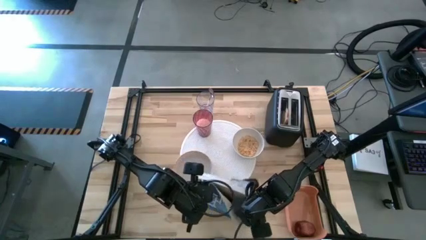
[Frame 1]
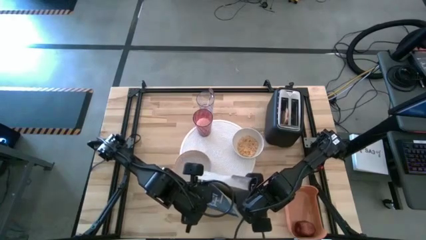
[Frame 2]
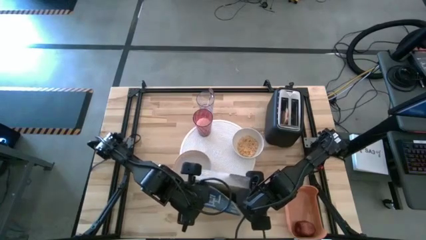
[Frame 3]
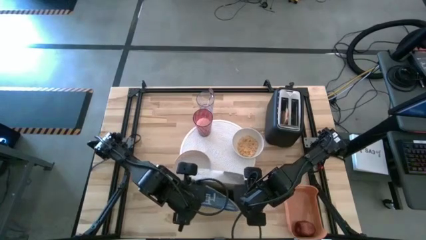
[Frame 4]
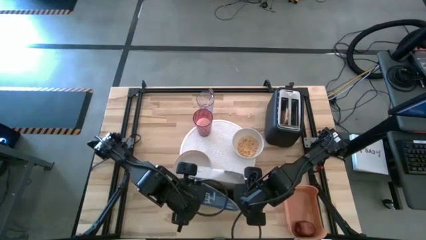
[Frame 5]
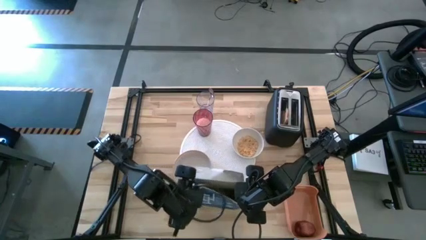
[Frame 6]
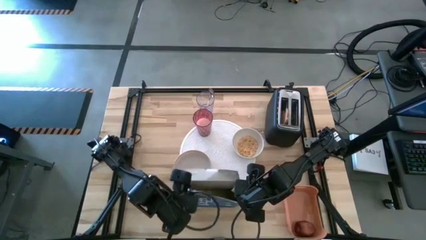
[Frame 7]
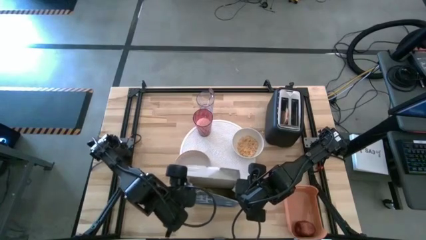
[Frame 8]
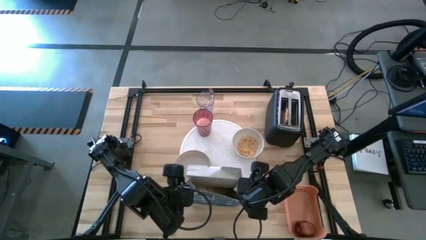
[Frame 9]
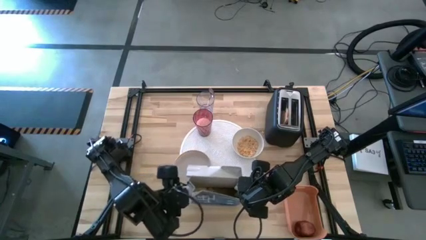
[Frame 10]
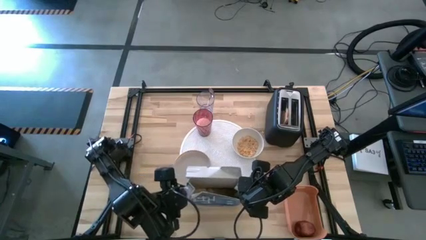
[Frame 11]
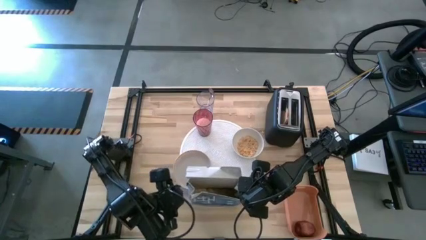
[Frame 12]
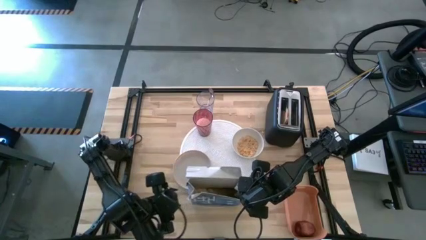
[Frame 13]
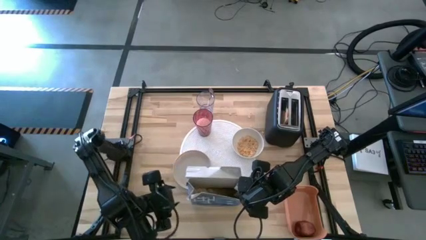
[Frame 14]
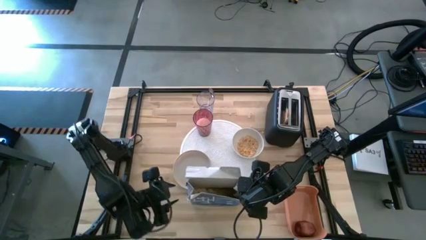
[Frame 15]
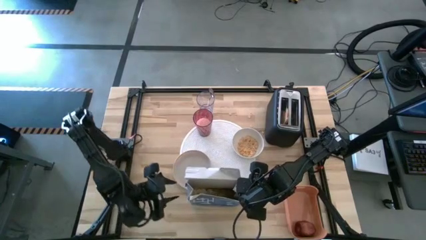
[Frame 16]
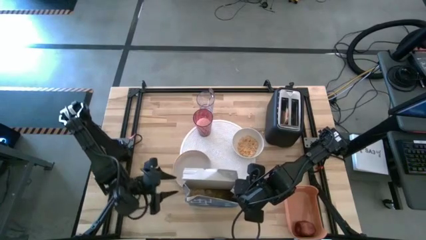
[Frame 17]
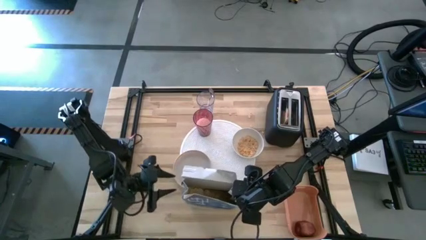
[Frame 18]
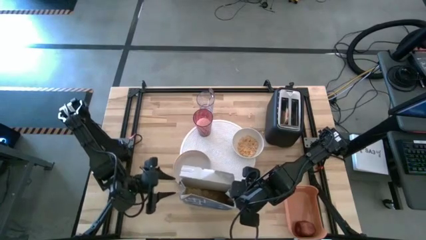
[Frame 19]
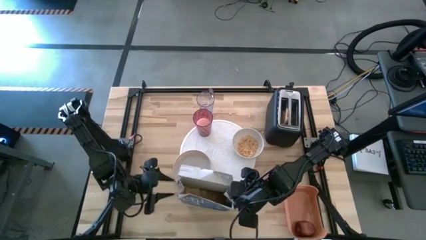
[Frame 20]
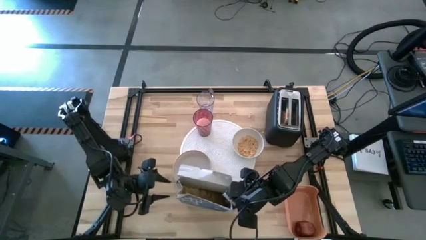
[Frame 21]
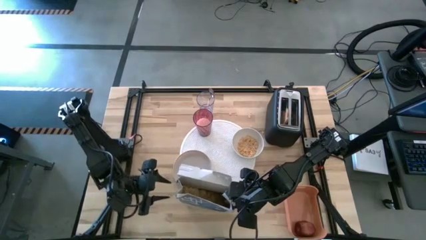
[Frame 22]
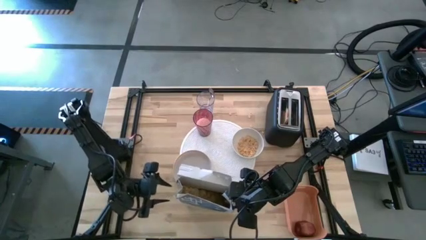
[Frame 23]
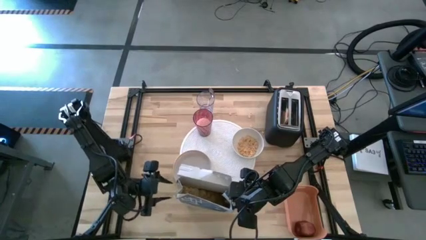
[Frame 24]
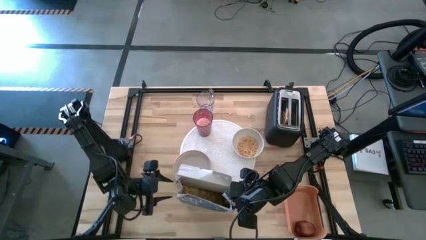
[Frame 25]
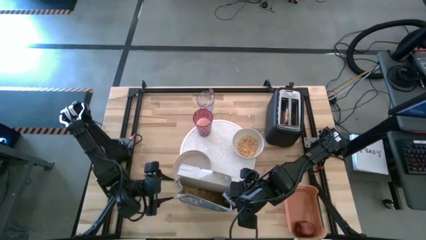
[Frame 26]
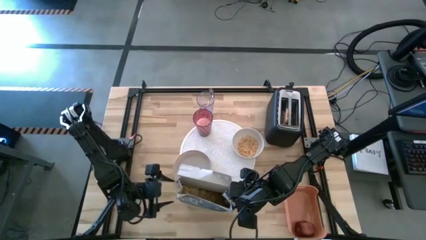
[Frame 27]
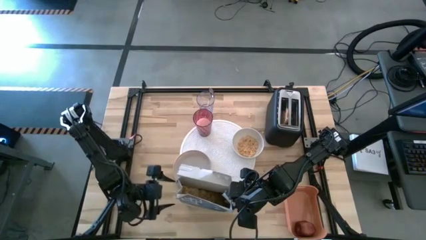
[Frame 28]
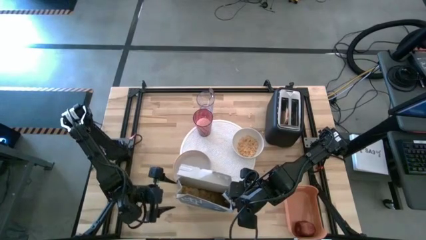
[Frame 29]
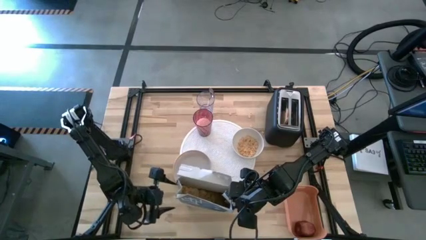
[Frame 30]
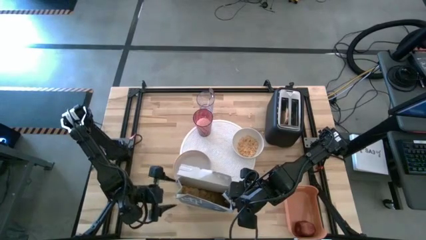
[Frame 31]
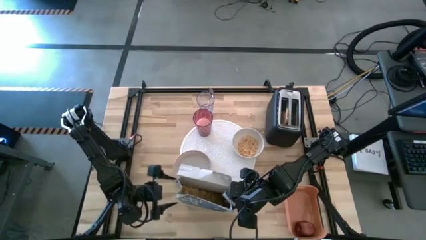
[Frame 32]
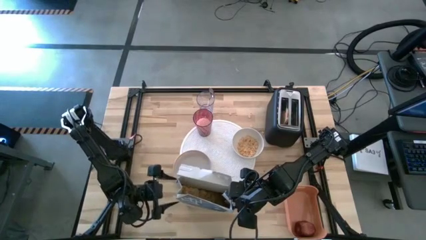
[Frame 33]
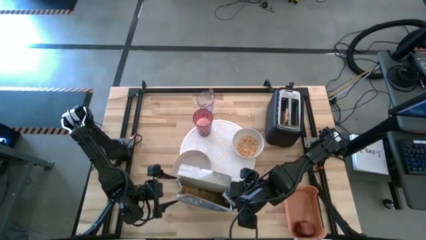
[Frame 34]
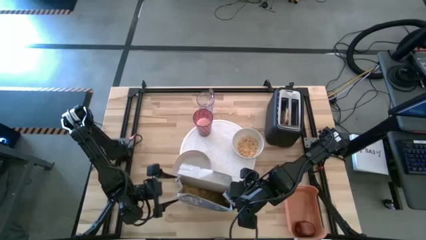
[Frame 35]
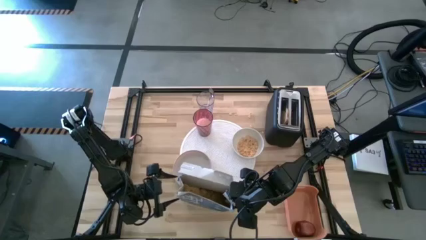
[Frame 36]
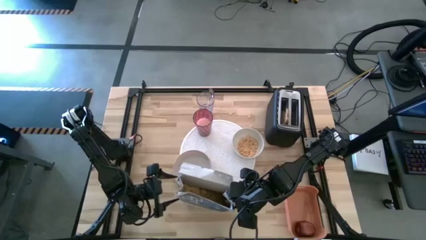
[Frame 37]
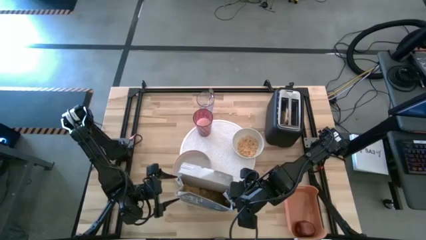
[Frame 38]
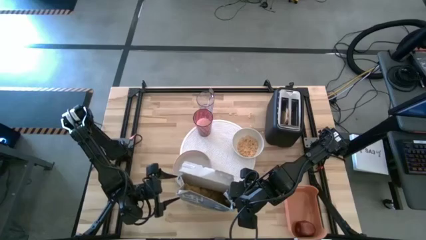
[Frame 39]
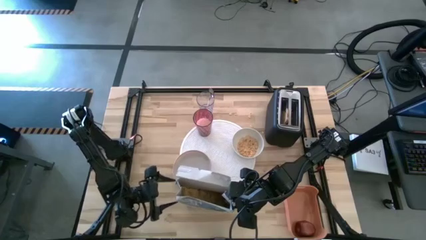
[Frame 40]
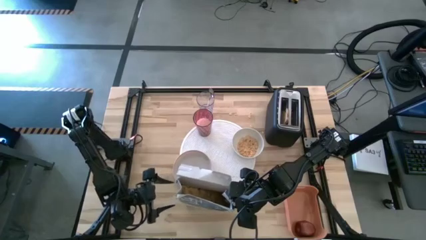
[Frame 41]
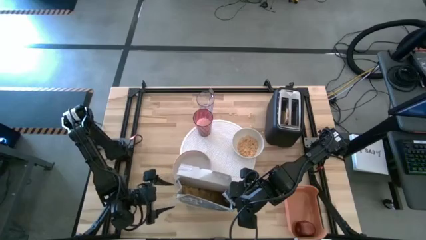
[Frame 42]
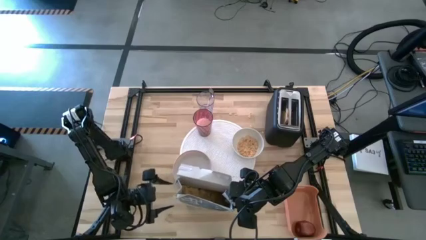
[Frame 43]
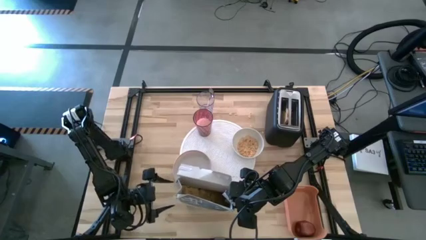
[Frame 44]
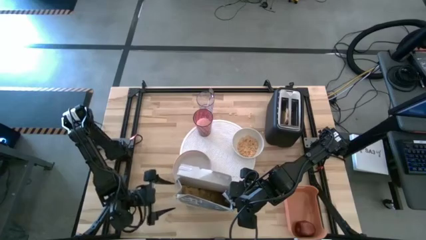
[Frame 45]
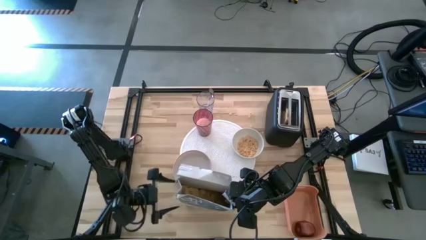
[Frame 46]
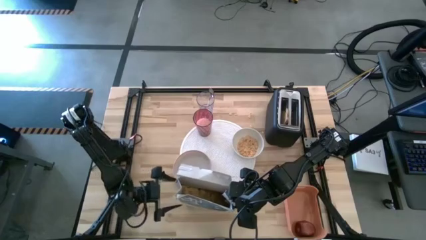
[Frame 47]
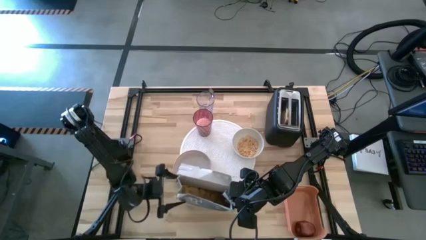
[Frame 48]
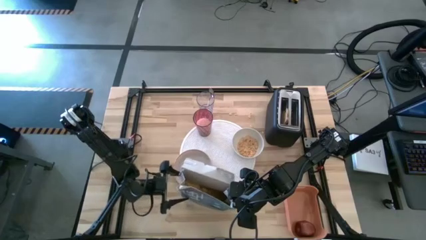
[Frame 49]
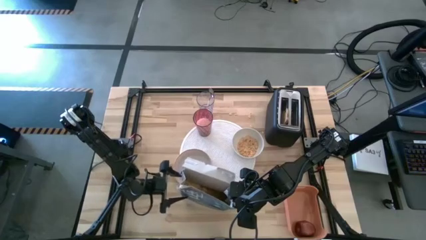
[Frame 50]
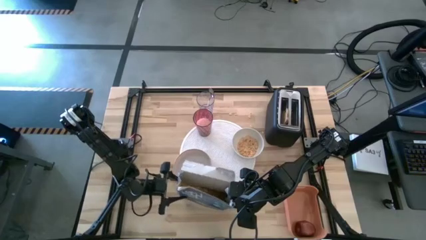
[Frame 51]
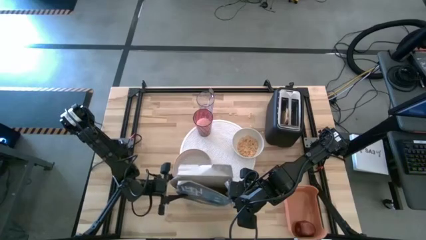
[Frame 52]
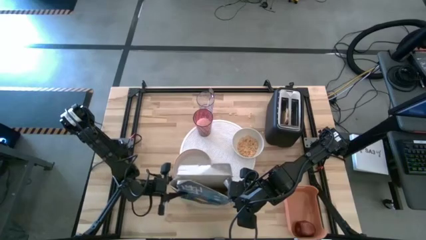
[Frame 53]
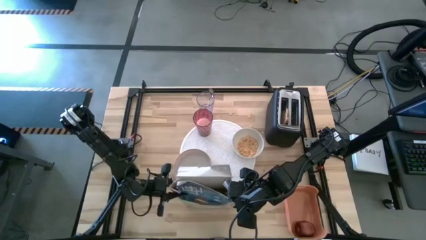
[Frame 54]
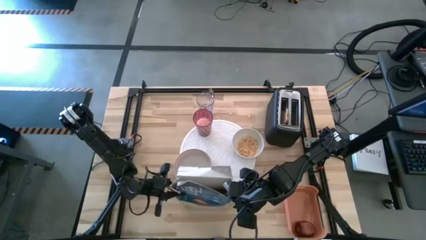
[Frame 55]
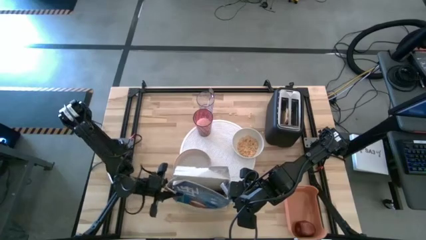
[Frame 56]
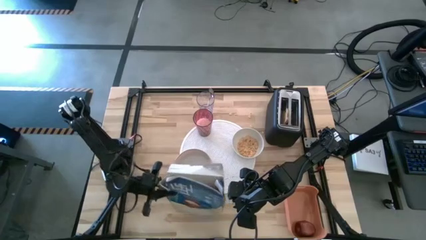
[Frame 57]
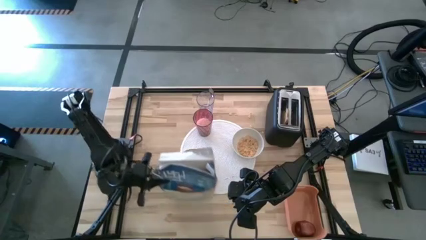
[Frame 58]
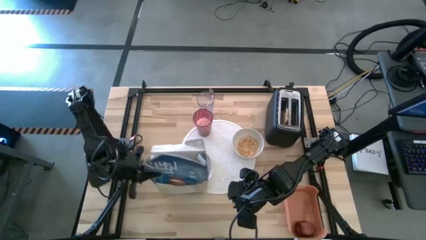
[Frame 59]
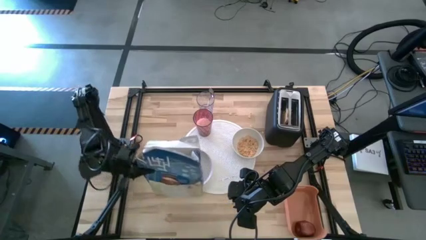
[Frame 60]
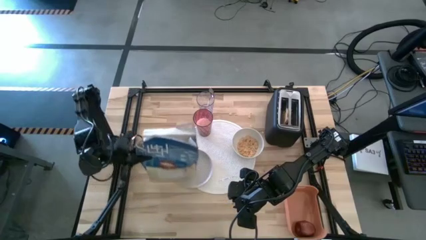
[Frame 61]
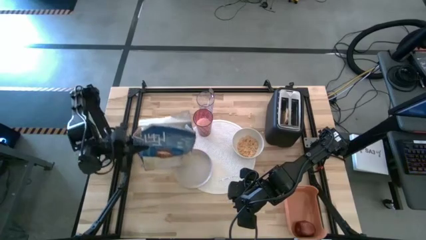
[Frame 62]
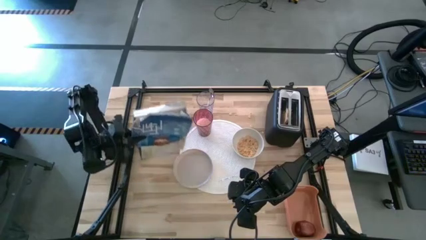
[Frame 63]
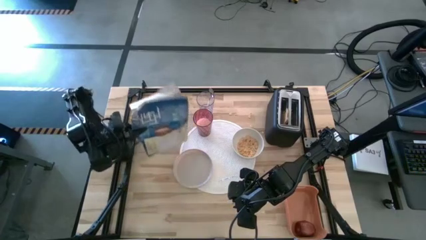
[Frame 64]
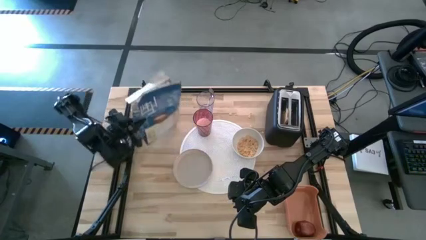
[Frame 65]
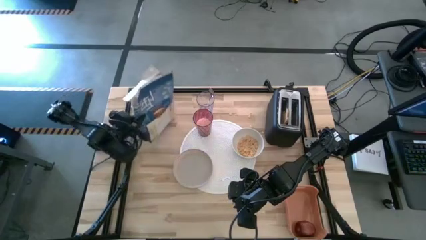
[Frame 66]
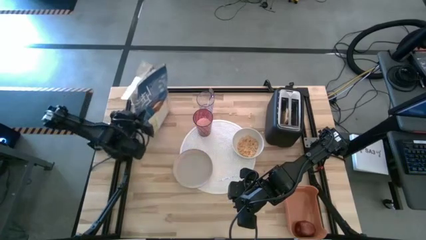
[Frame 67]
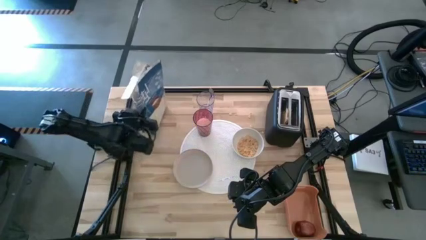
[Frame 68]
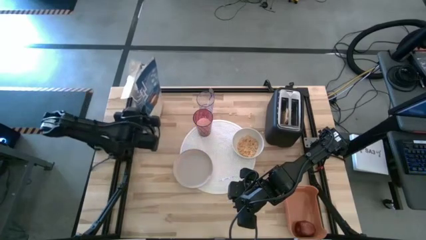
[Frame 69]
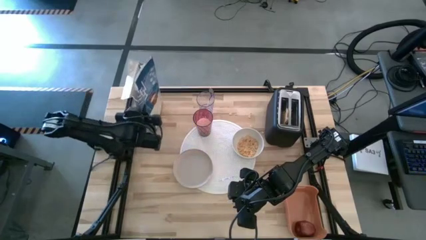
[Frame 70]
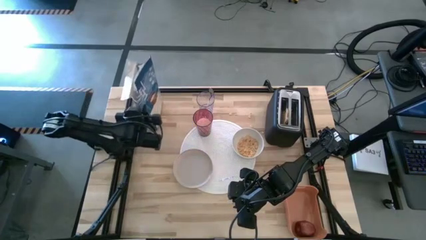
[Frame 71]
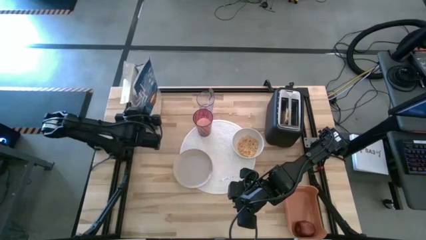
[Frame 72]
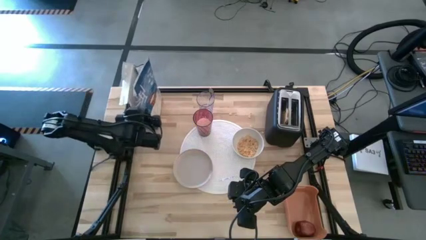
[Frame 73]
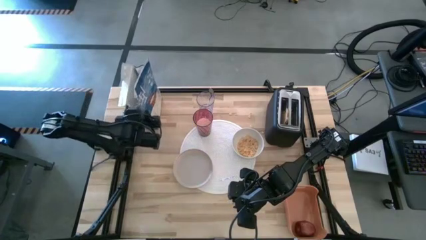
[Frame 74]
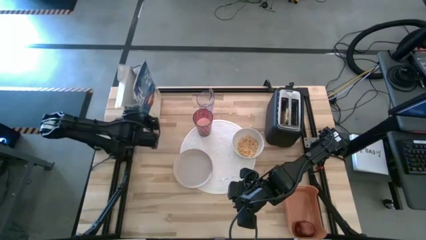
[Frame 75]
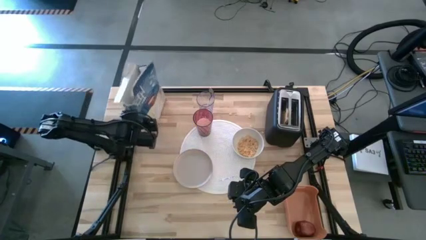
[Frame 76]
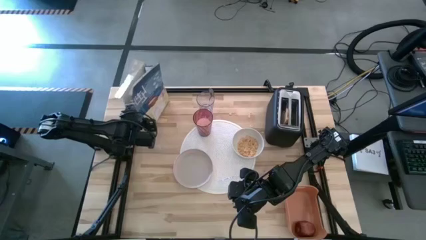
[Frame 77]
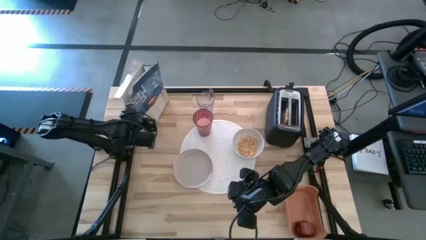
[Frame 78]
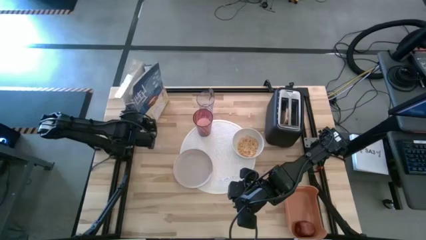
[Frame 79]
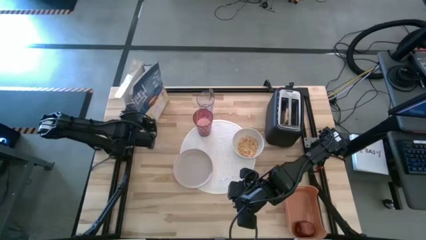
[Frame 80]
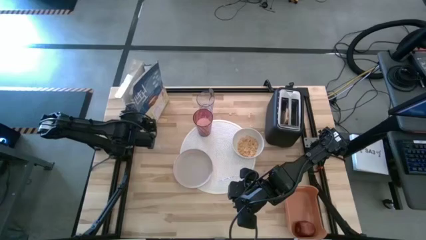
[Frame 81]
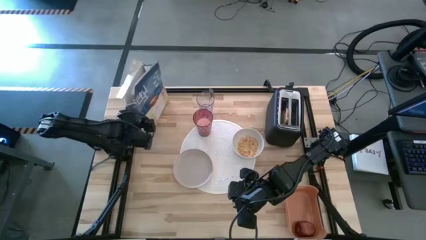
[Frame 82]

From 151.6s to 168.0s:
Task: Arrange a breakfast setting
Pour the cereal from the cereal box into the white bowl
